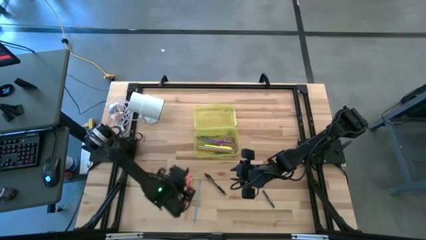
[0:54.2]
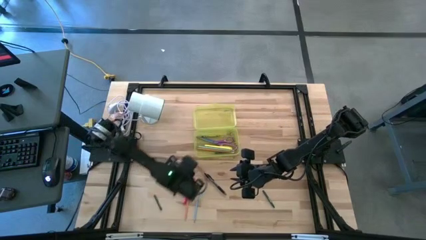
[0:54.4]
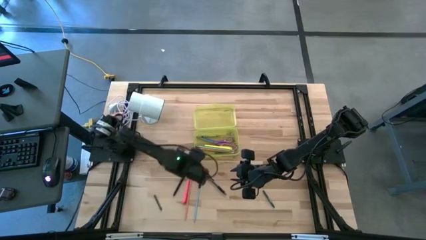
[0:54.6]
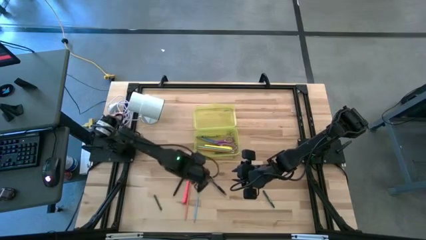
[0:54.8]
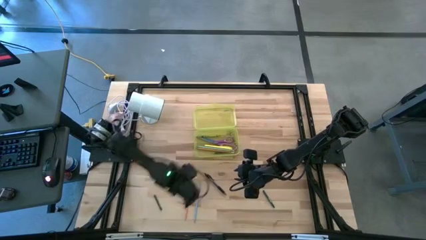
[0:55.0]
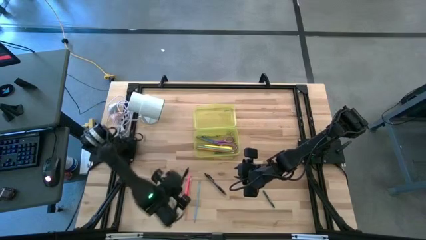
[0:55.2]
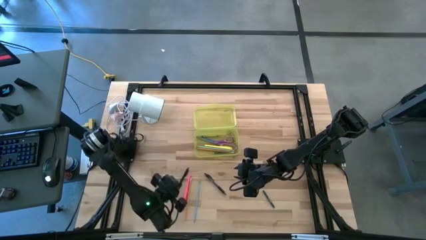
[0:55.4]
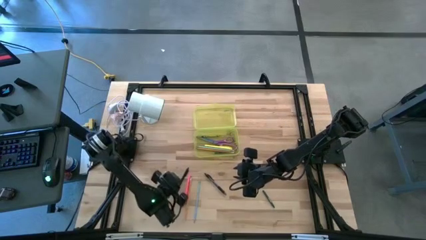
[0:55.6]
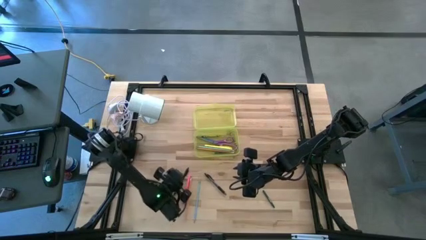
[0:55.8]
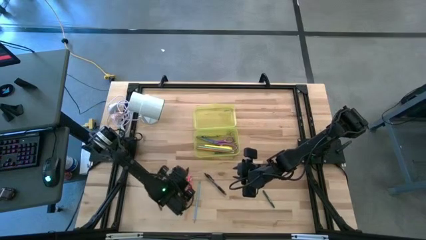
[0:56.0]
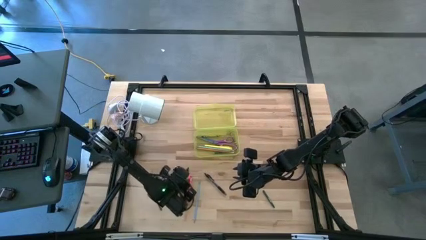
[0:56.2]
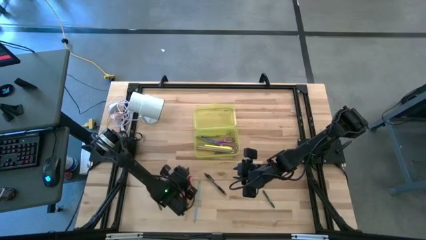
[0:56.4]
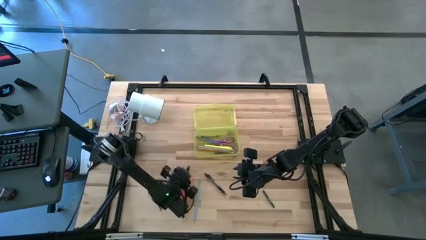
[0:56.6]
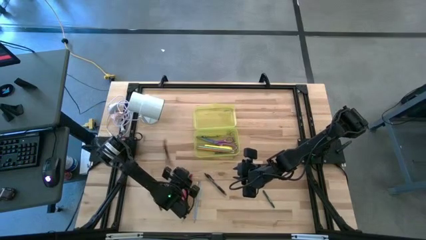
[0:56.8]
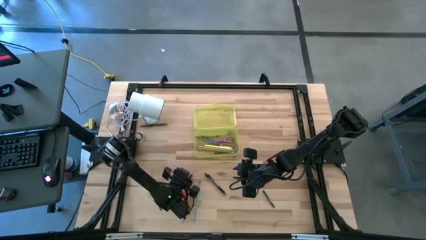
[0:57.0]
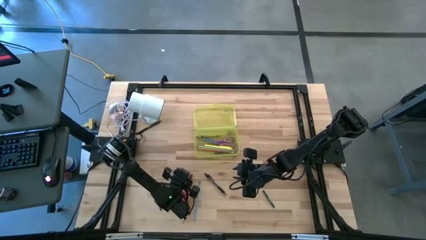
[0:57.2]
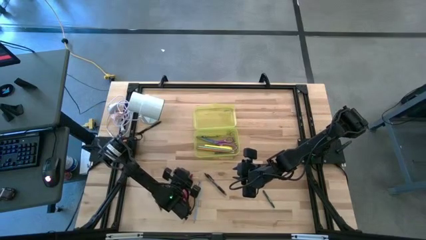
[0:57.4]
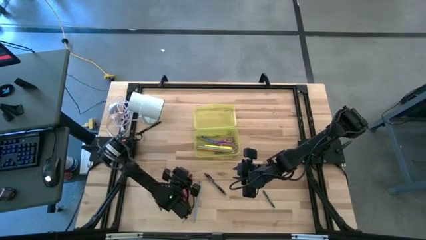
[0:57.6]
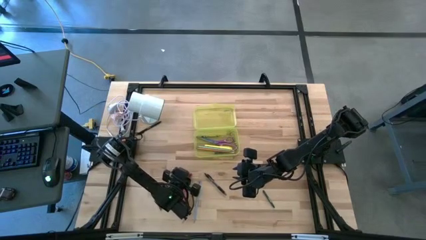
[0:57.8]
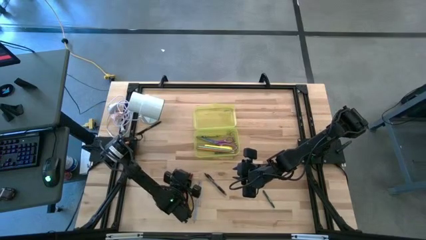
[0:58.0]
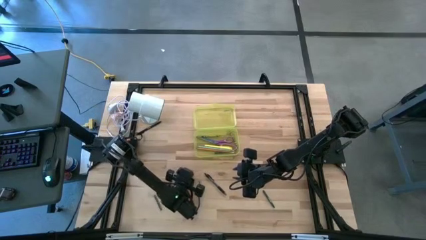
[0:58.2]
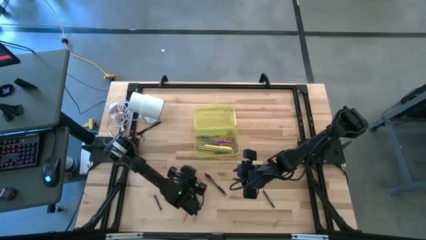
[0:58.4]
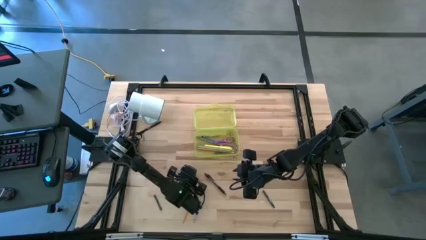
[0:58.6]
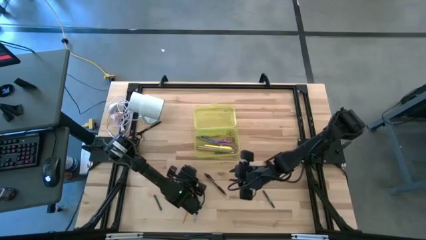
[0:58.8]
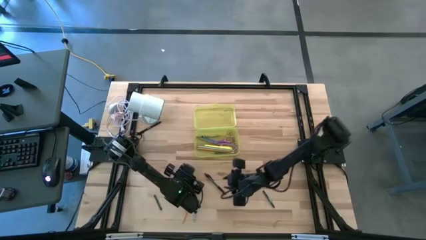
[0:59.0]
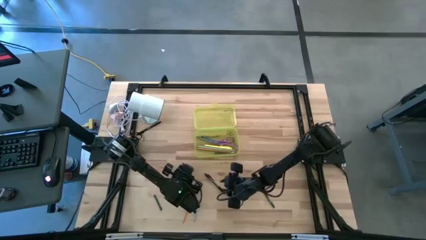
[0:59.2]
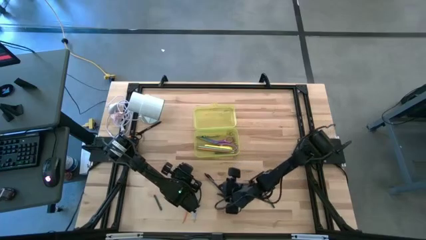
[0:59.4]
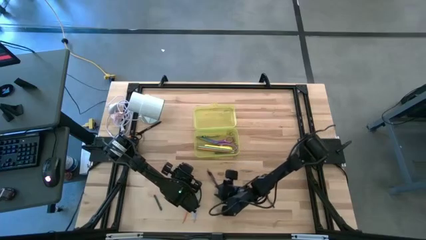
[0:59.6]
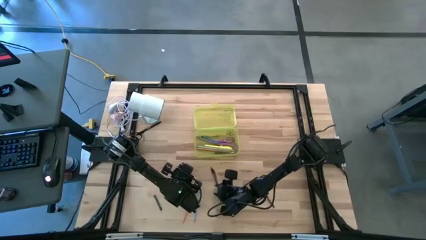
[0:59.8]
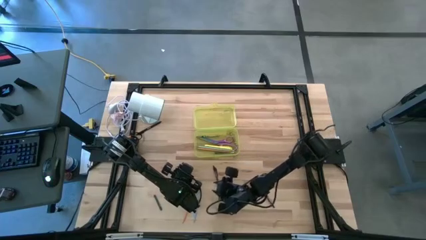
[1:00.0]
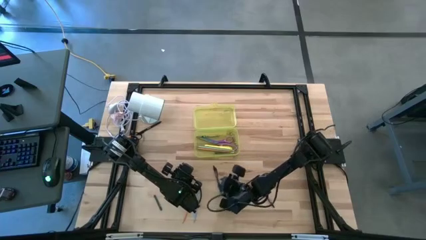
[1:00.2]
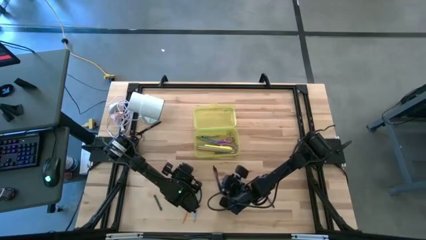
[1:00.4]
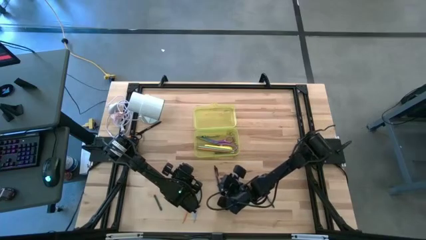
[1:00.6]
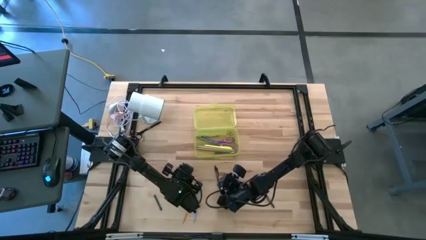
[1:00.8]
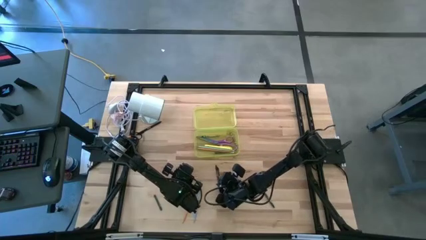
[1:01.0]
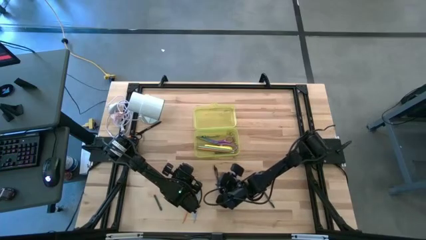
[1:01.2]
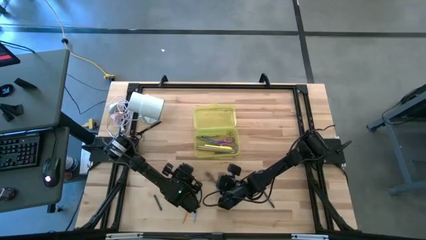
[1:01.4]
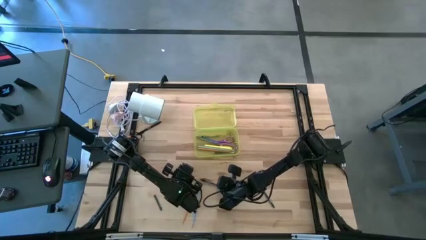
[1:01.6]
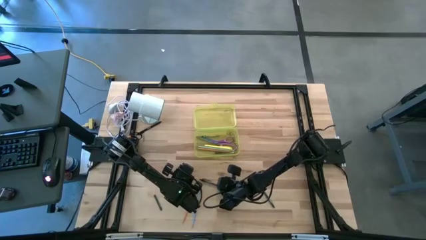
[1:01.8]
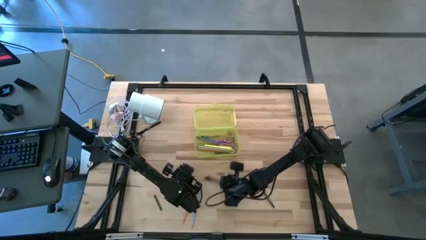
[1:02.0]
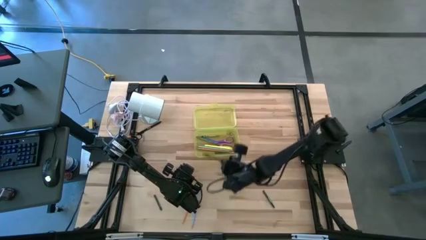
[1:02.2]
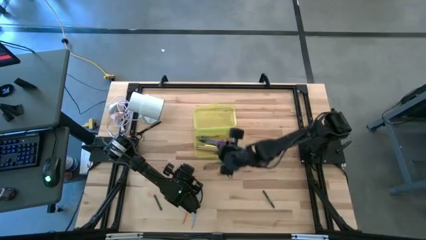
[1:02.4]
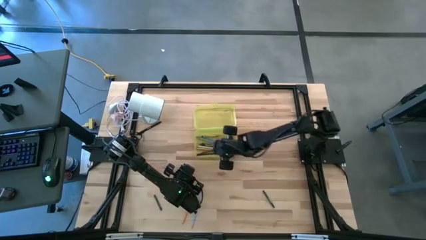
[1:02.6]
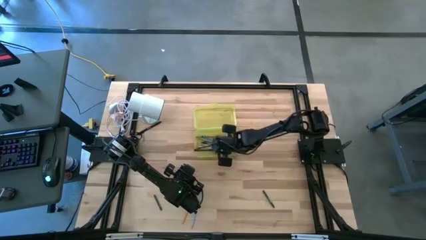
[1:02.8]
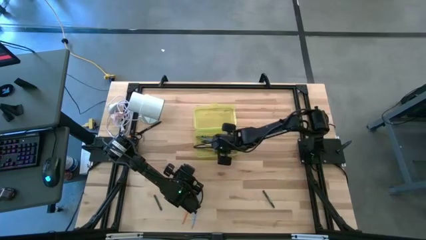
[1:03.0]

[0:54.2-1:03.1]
Task: Pick & place school supplies into a supply box
Put the black pen into the supply box

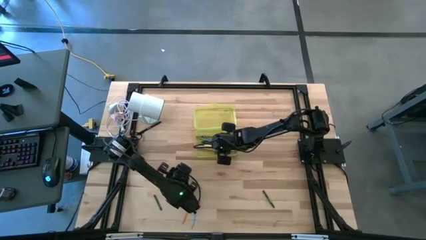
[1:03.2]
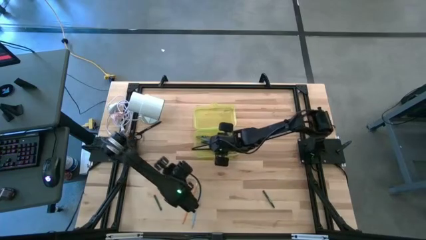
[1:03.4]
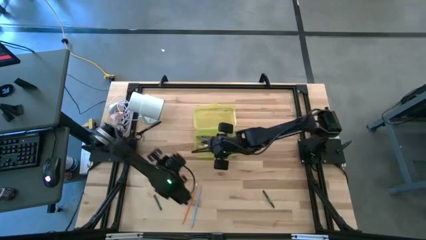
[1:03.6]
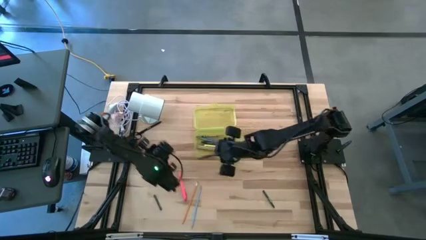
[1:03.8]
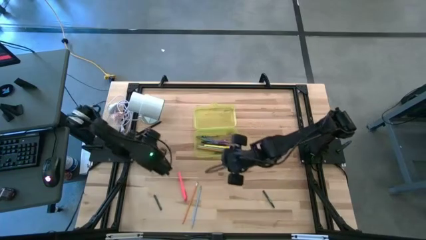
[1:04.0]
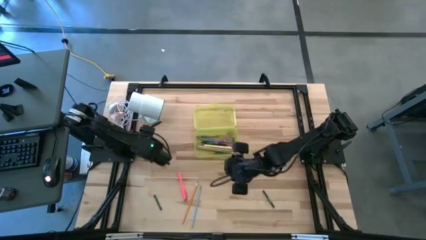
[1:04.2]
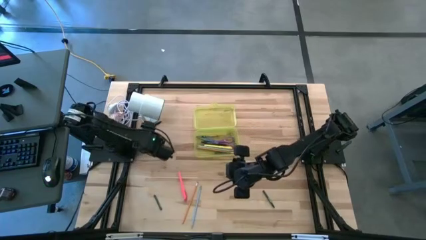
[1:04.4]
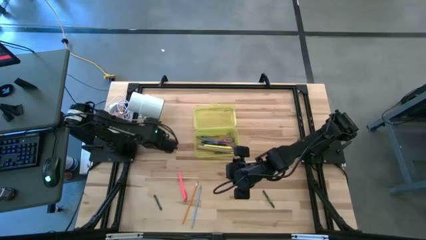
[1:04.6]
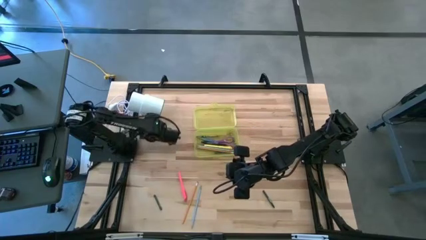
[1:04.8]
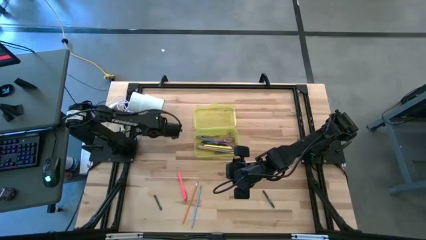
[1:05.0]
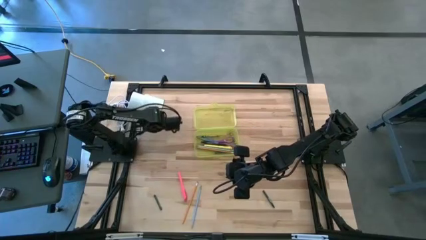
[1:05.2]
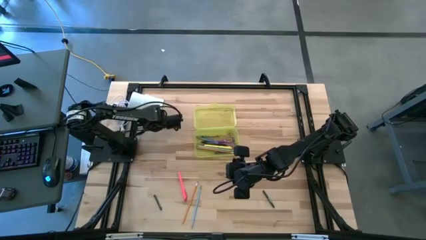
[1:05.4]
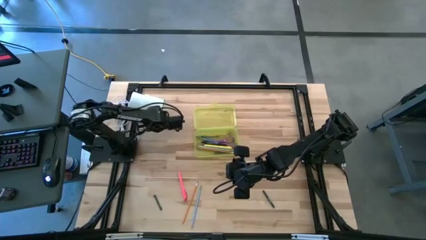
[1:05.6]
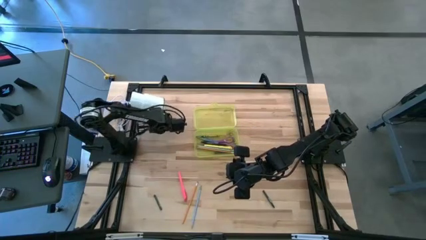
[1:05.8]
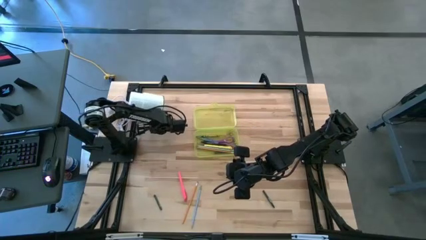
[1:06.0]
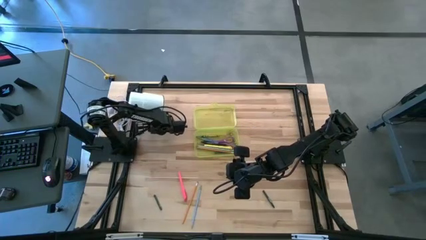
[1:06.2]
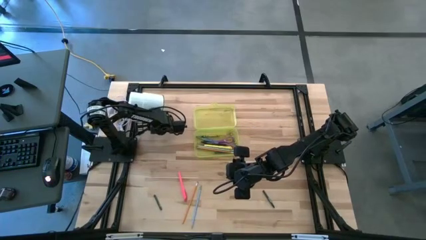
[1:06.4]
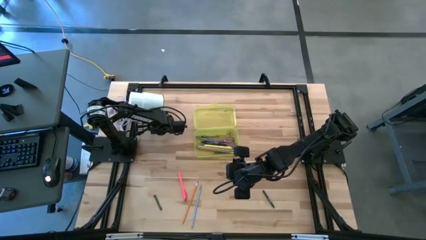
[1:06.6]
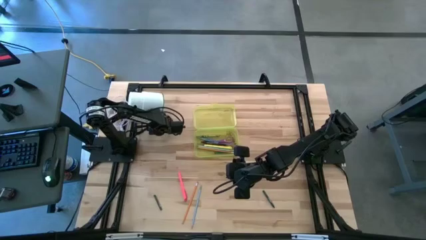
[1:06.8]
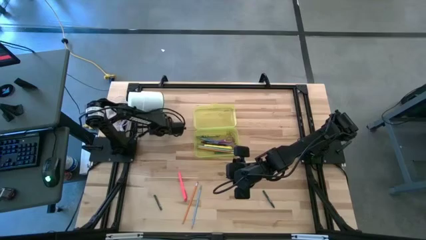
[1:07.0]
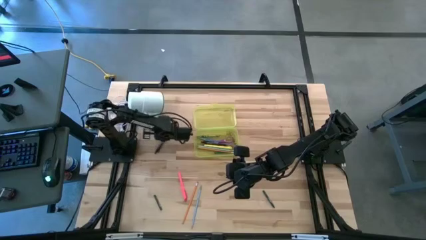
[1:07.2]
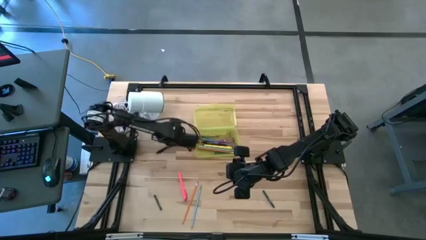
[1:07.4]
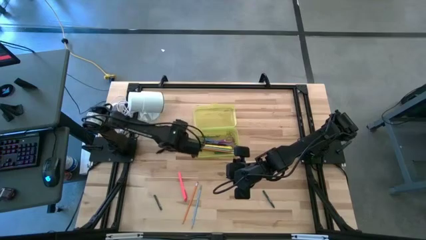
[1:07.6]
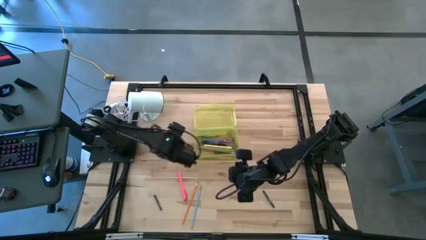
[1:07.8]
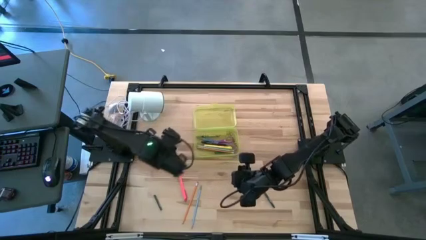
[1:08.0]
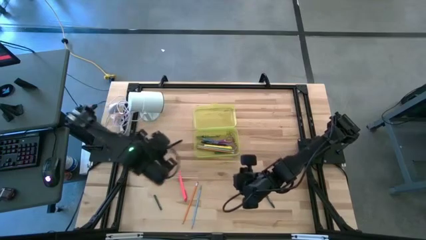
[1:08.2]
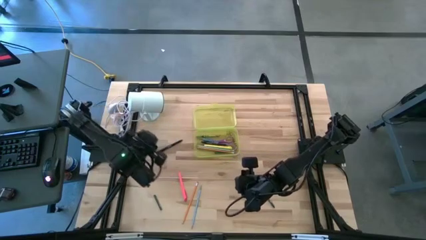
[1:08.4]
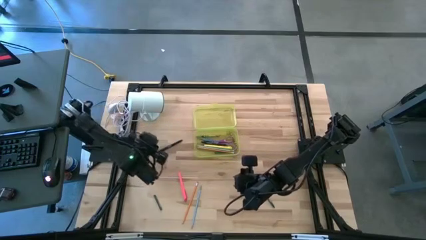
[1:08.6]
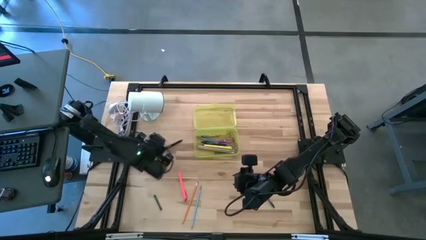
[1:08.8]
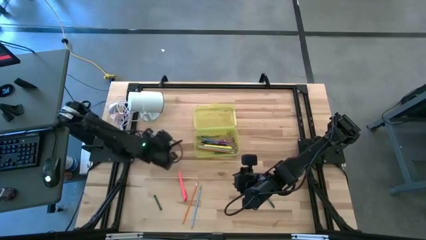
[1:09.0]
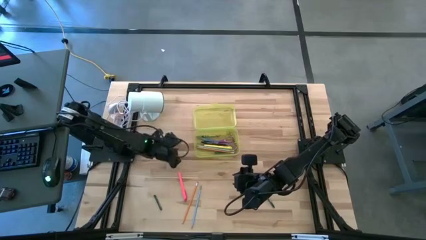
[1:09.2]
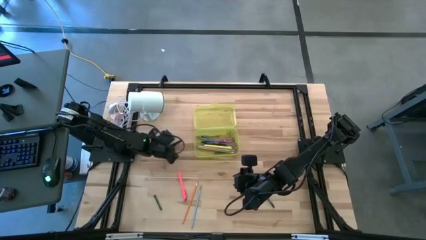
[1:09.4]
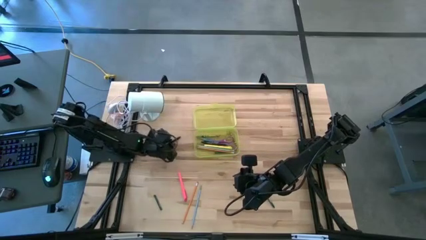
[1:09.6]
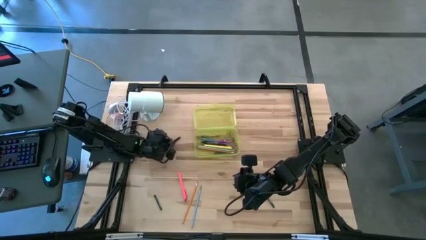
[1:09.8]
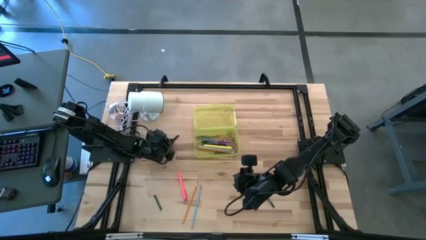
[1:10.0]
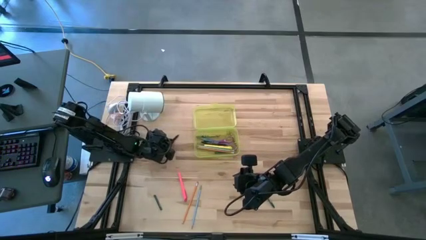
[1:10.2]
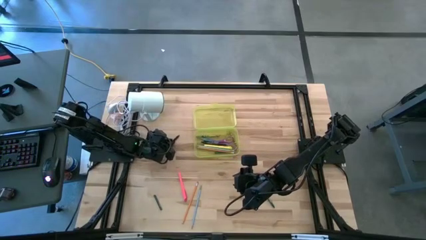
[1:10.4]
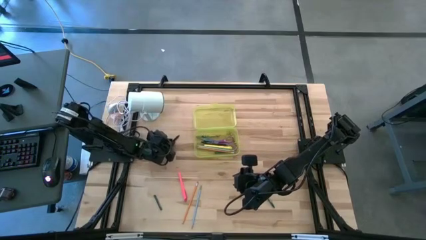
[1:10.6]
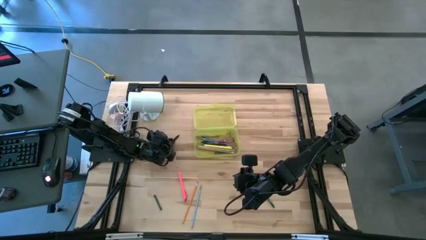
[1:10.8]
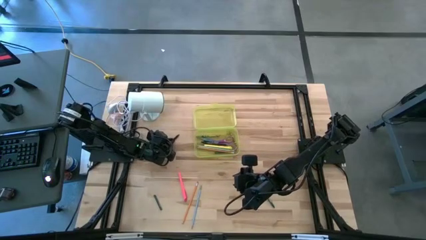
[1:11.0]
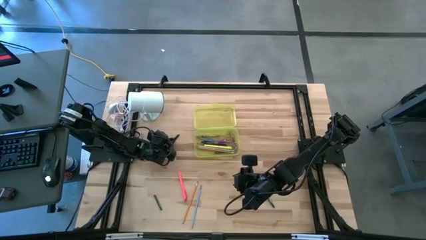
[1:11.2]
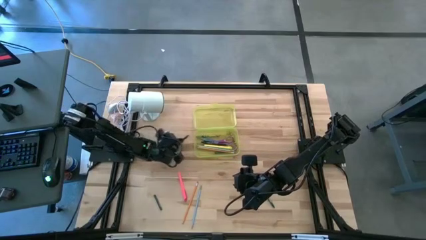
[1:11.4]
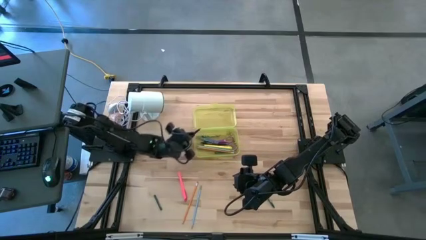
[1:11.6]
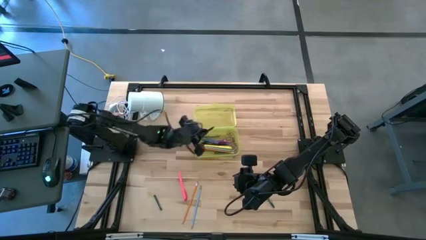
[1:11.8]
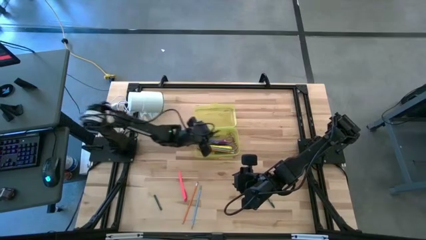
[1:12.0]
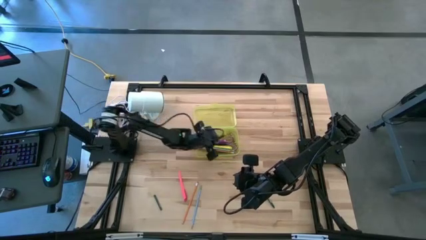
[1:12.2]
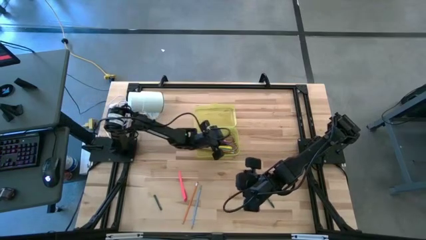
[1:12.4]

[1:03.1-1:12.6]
Put the black pen into the supply box
